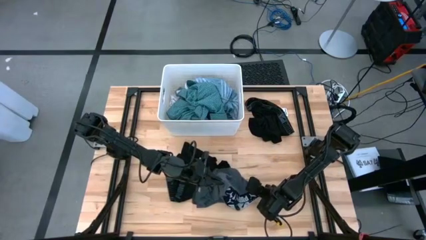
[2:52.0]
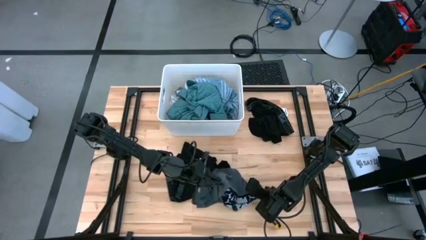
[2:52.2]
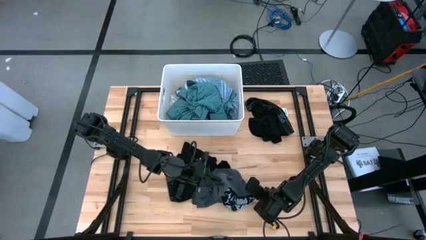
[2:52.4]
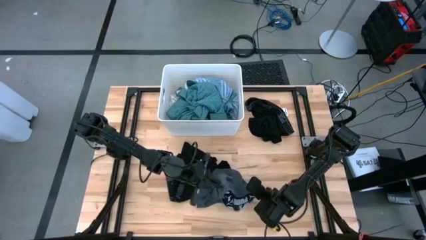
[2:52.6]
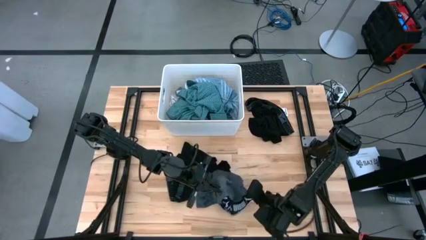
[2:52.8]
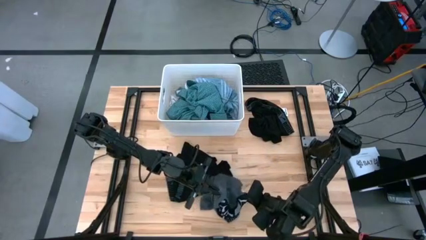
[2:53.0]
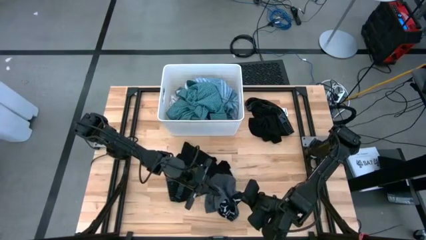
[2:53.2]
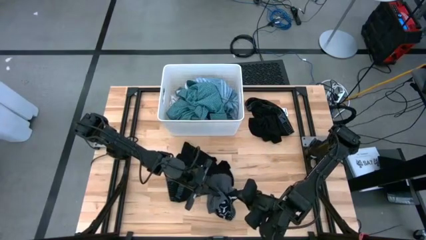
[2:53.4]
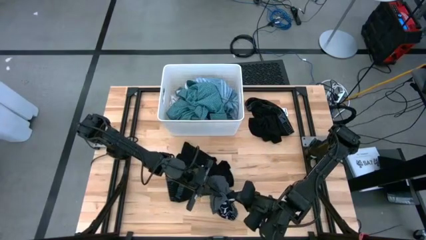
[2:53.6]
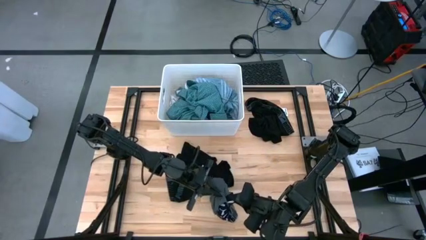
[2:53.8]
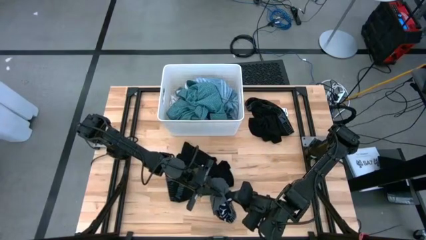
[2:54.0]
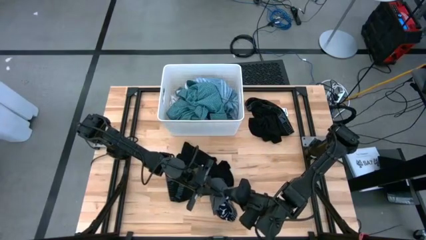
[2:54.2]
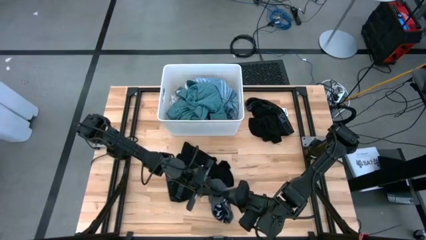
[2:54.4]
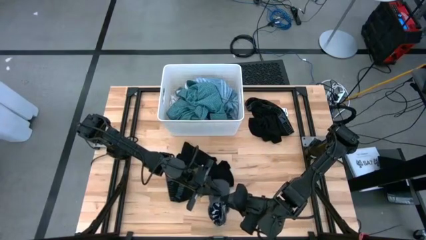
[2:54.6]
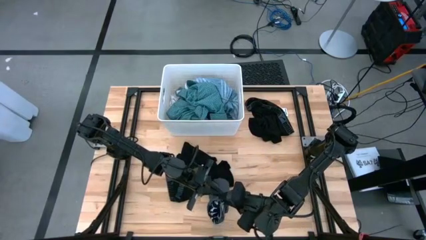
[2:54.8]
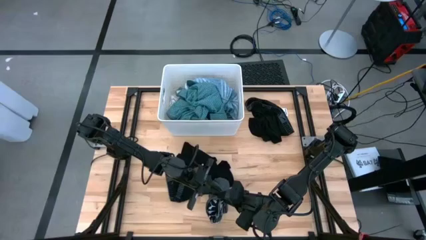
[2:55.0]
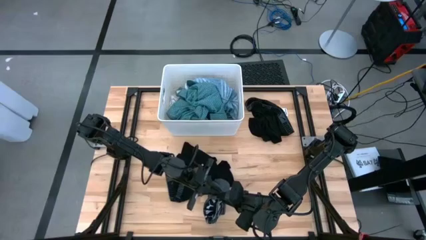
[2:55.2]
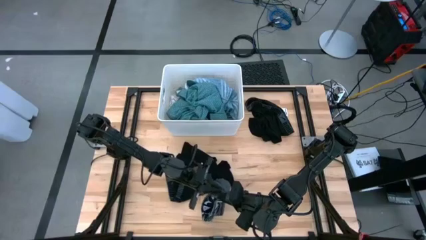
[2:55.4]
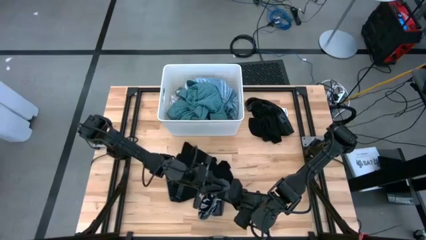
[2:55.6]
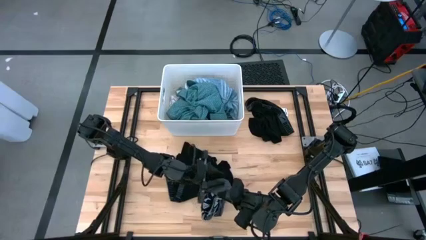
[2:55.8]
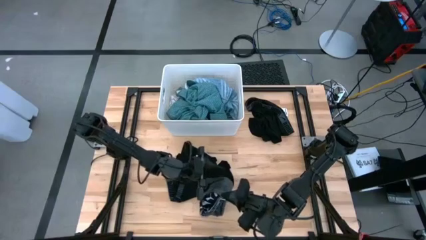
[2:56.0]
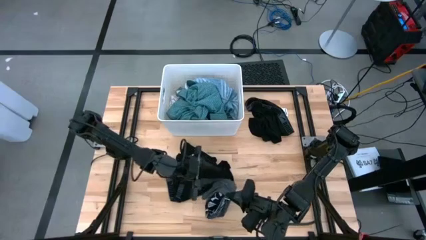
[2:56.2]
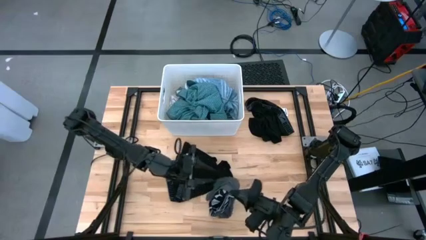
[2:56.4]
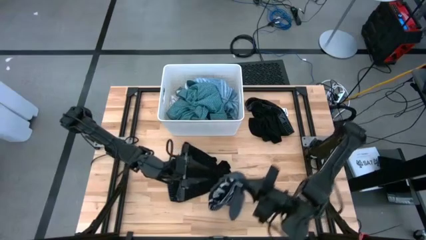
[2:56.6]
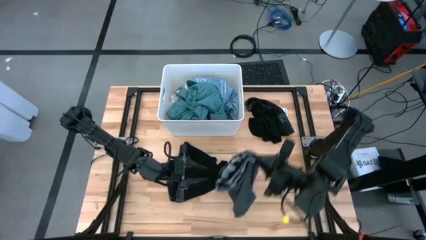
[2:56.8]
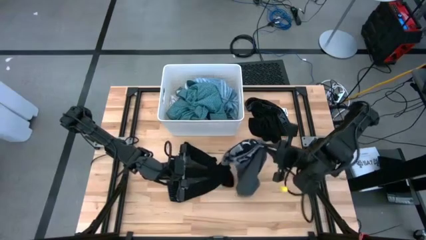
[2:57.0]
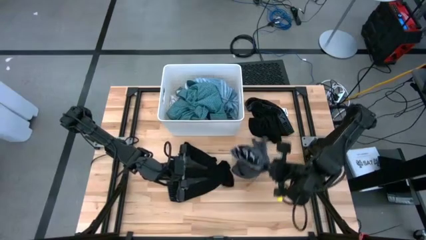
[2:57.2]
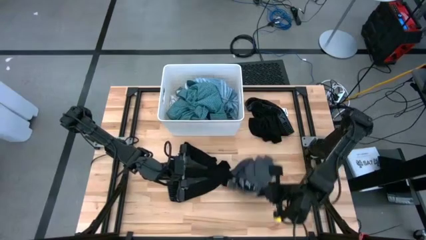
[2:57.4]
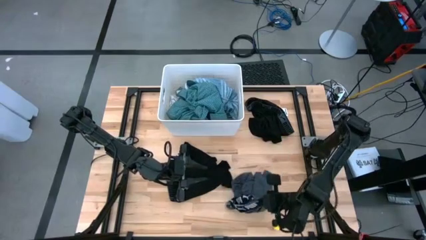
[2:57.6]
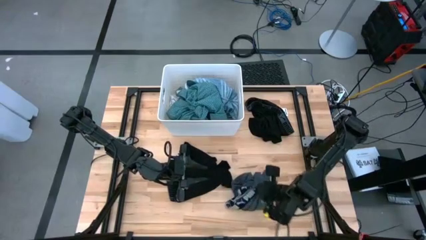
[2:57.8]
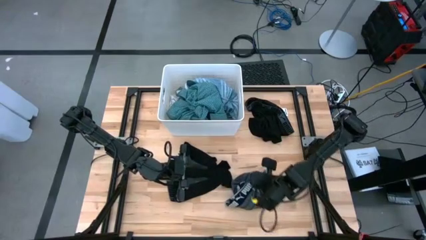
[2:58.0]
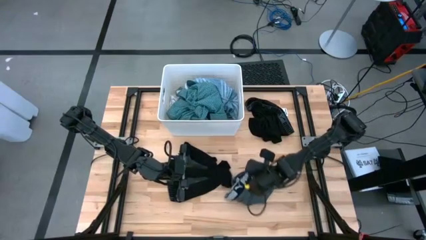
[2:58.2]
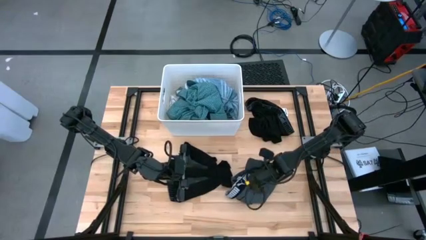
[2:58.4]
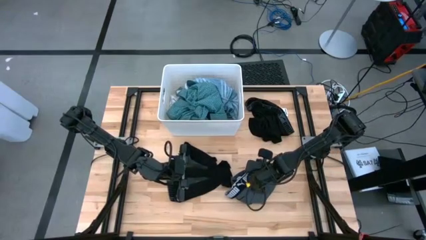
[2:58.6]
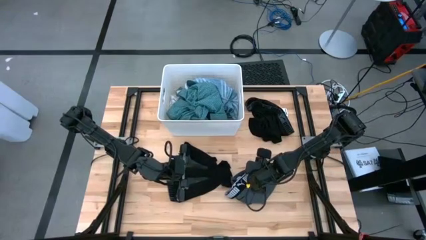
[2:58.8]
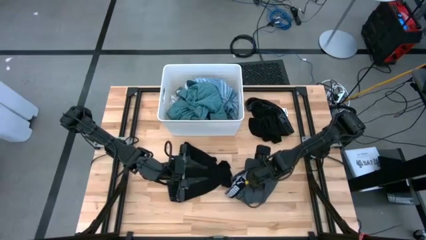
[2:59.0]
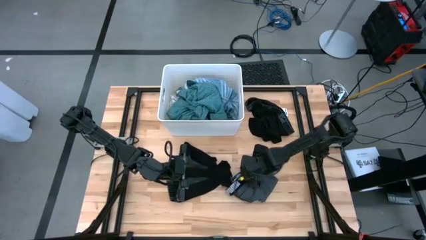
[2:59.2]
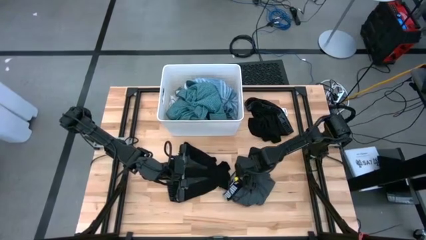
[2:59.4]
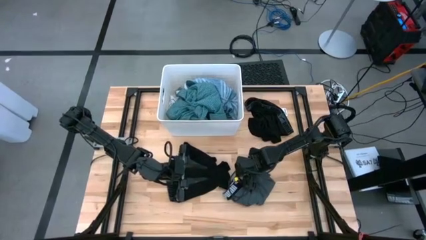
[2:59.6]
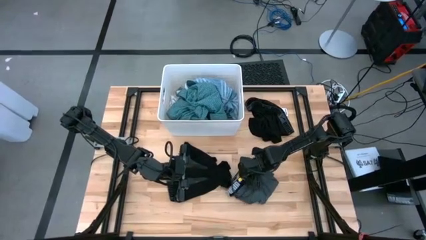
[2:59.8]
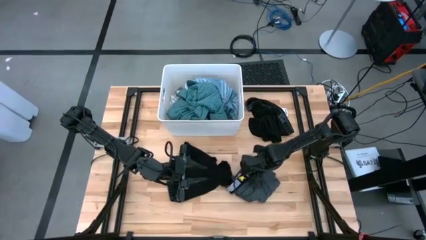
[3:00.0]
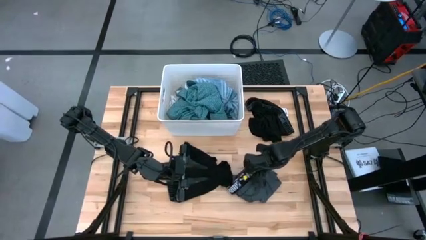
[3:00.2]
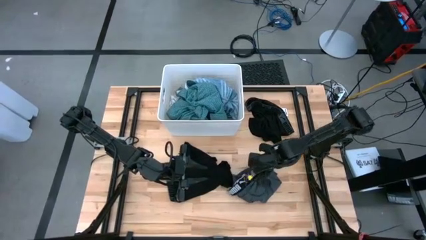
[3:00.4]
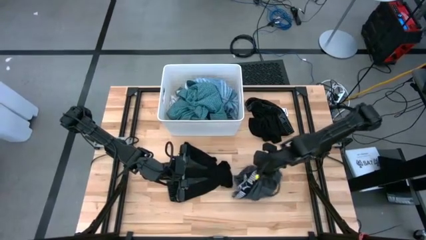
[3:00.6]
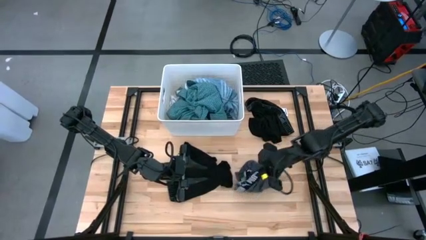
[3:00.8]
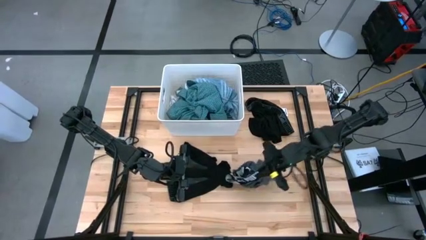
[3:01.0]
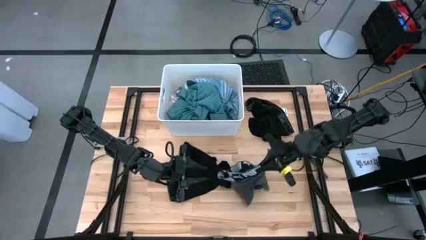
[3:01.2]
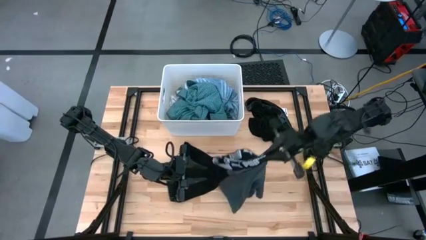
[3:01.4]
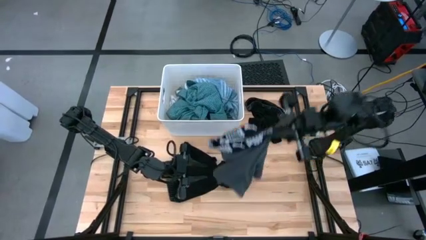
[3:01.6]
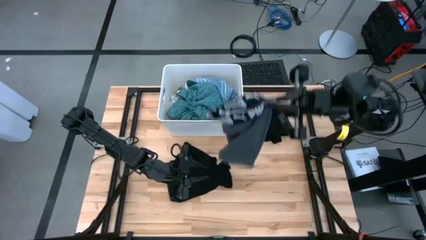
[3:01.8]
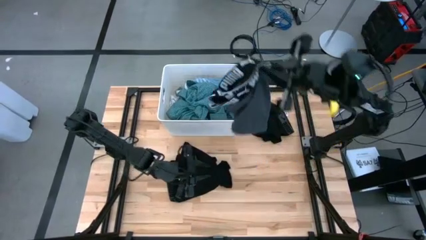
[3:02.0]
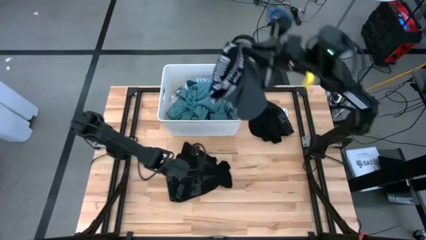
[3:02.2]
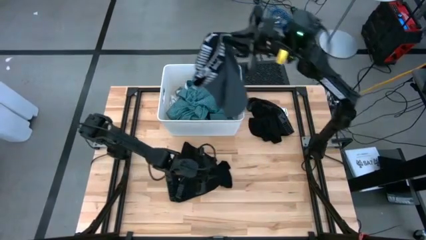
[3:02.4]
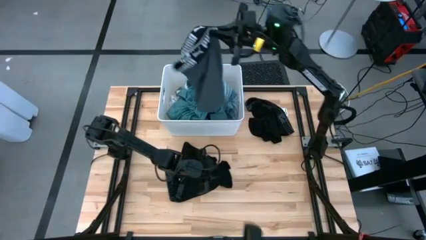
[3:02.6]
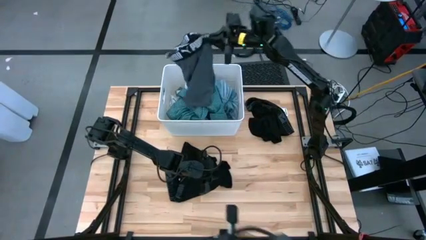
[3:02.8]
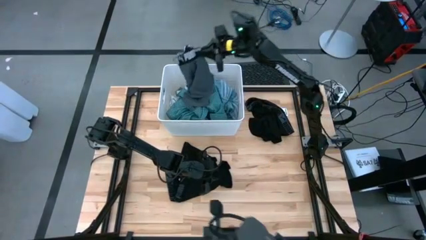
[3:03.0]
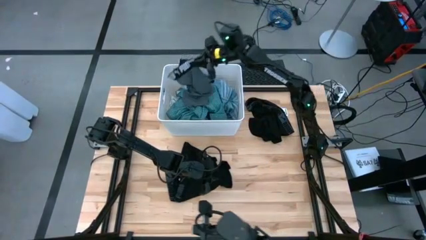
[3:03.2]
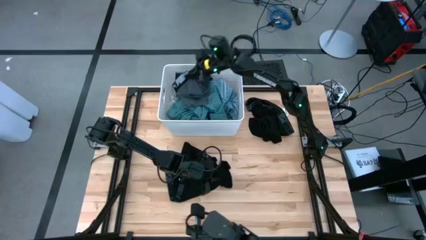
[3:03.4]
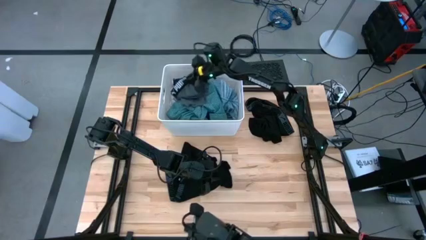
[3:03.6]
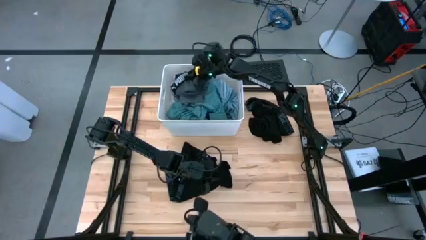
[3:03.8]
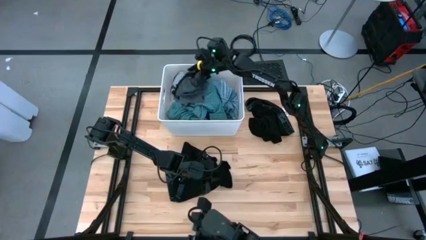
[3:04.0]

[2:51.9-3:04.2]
Task: Sort clothes
Put the gray underwear into the white bin

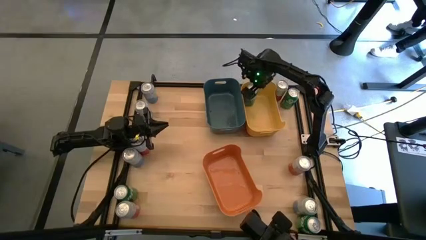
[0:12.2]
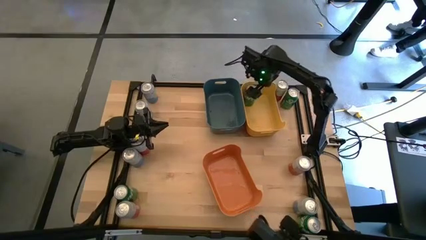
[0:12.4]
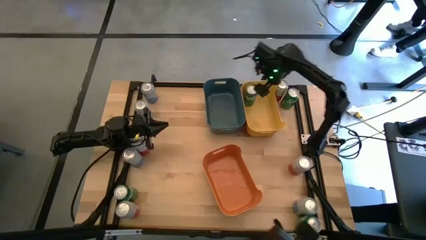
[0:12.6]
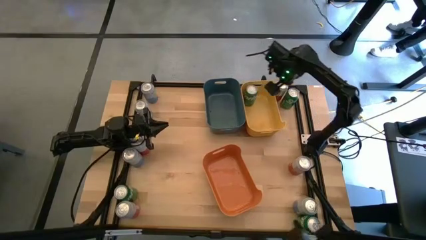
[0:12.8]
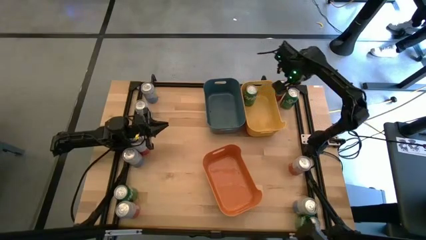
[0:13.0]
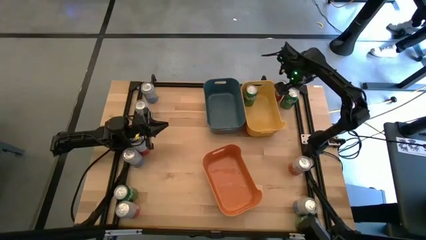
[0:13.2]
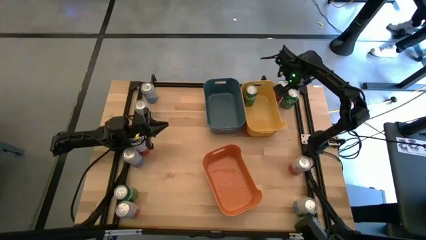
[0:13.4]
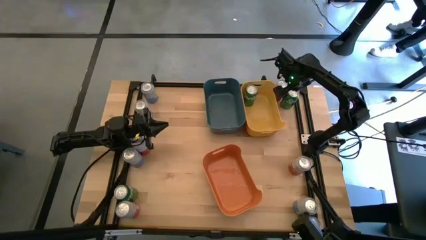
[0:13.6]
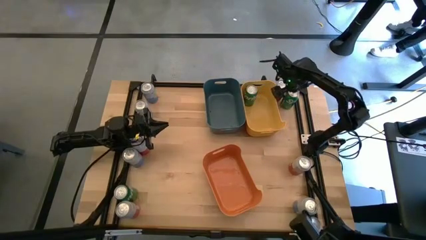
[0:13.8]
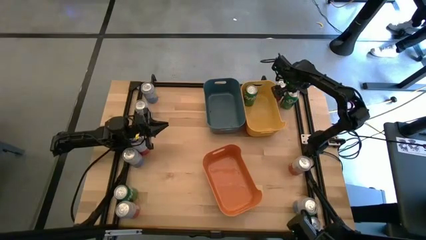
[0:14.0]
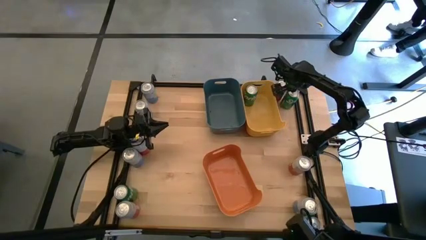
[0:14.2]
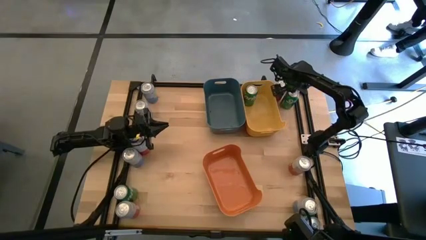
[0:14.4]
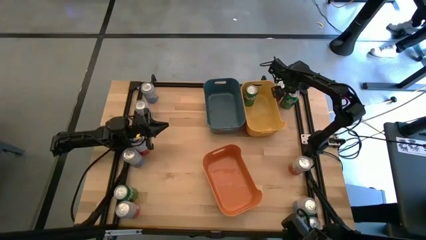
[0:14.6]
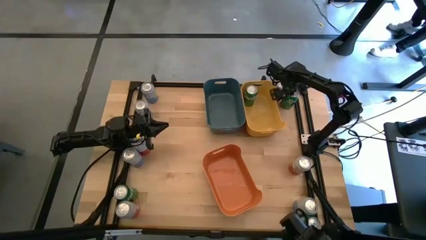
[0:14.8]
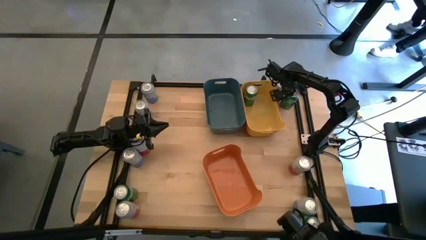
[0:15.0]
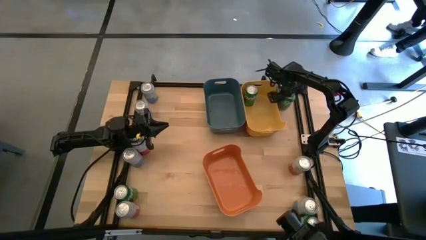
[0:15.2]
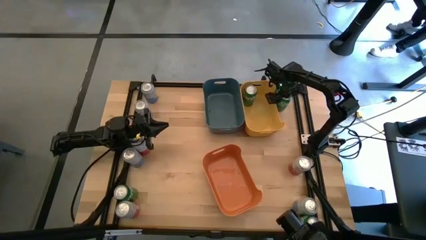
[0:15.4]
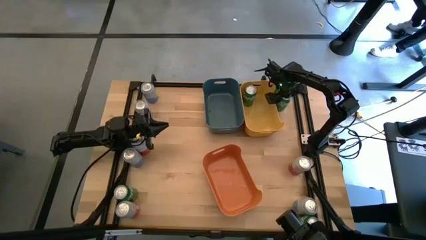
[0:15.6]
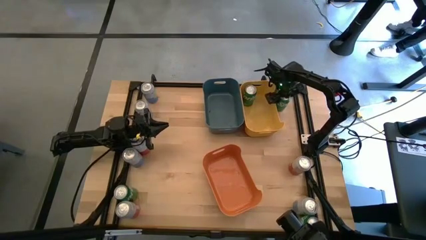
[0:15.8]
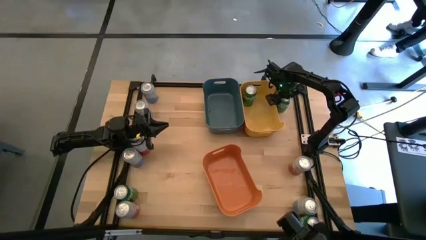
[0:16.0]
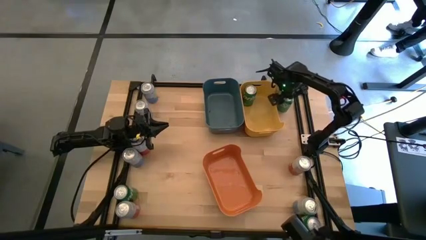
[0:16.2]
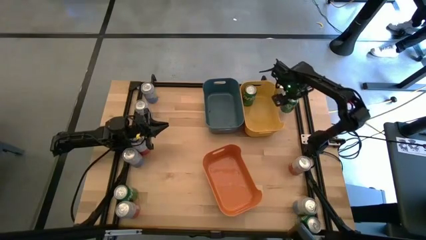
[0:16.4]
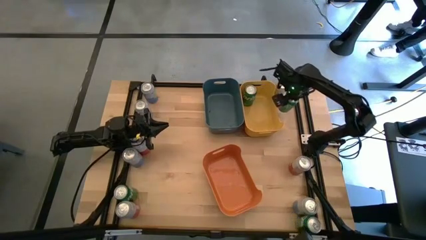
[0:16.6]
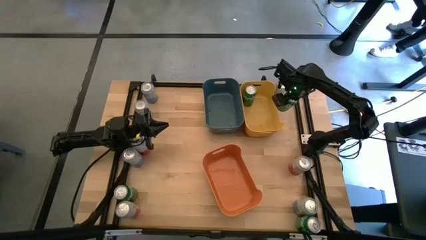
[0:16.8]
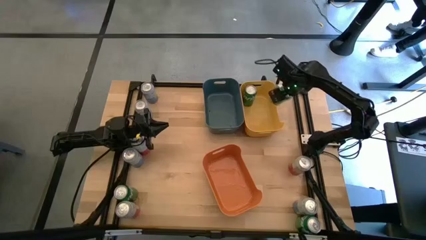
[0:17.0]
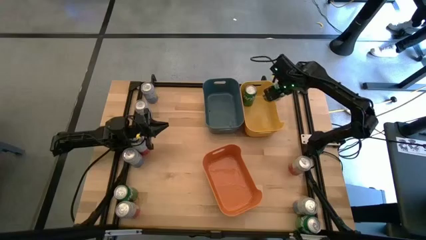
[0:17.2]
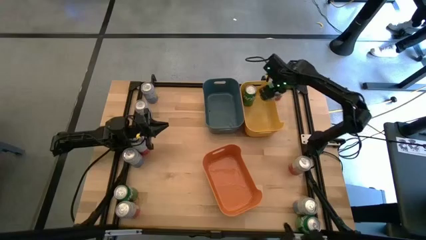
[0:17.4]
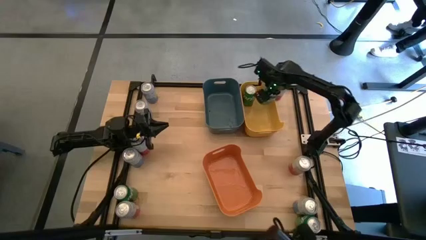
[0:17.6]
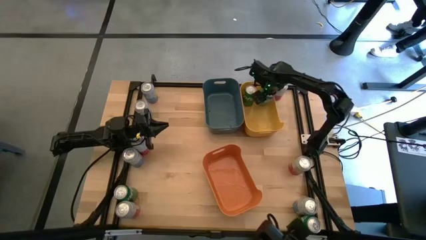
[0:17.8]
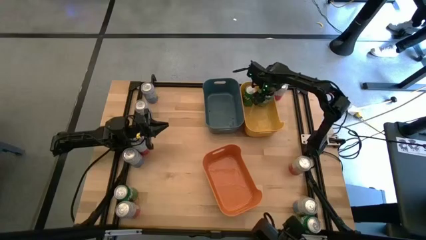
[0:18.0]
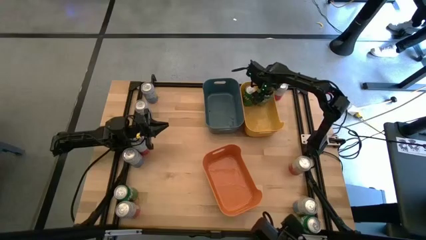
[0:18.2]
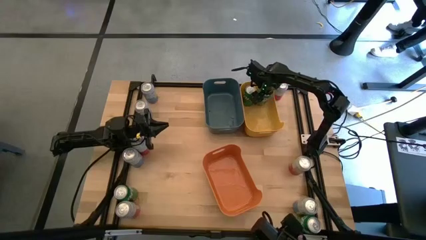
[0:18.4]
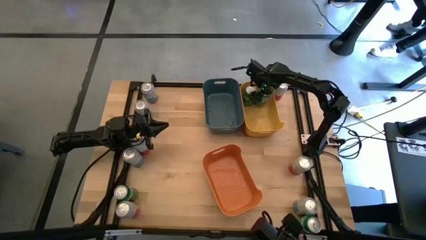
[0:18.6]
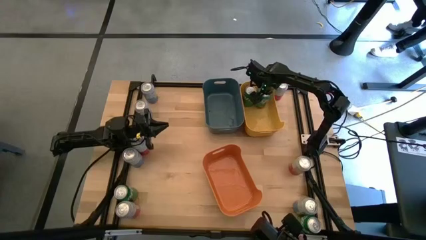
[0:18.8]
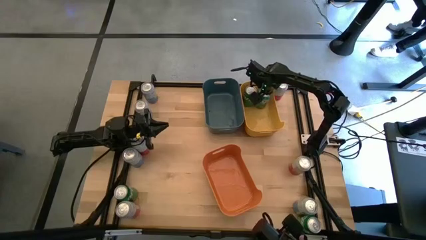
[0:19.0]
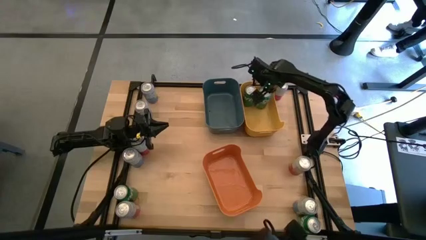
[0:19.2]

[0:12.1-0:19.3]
Task: Sort soda cans
Put the green soda can into the yellow bin
